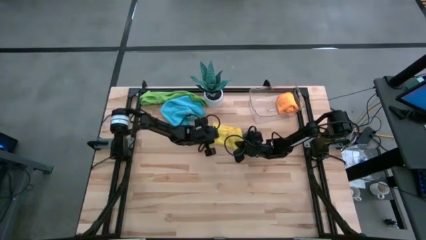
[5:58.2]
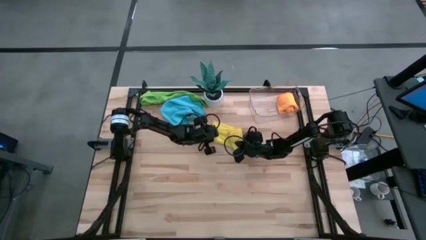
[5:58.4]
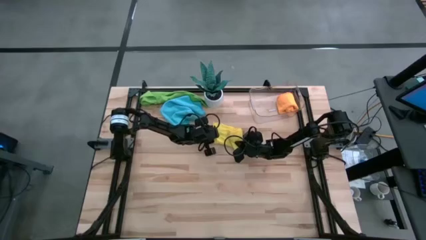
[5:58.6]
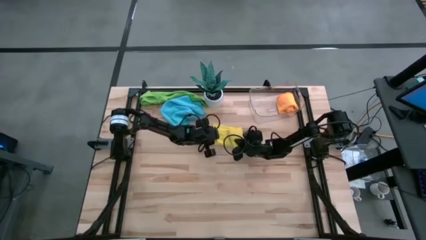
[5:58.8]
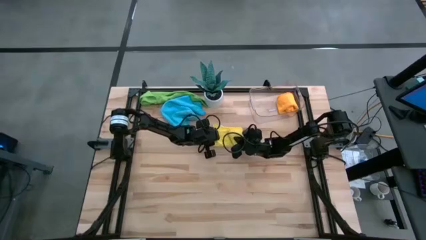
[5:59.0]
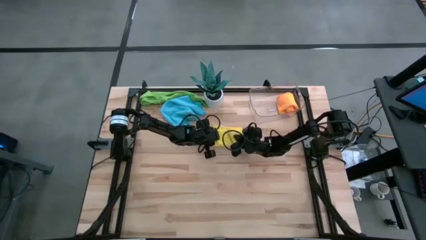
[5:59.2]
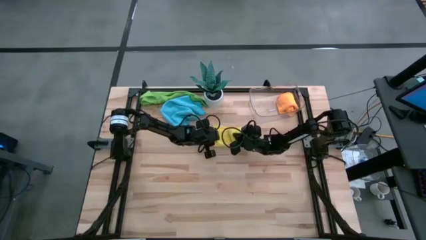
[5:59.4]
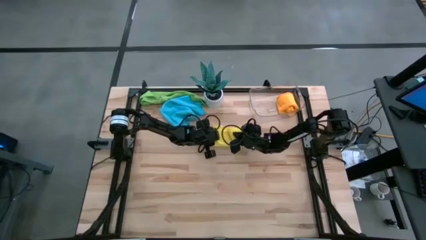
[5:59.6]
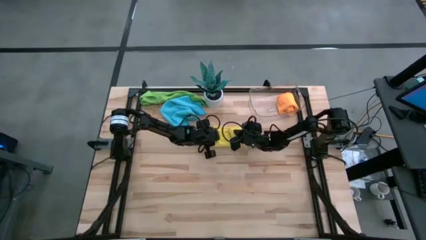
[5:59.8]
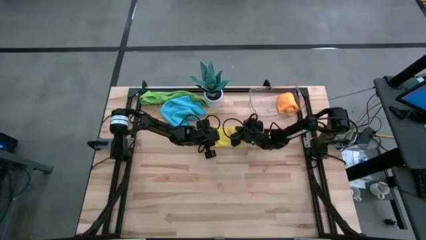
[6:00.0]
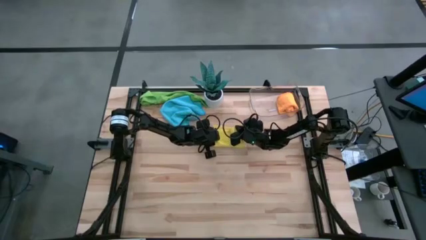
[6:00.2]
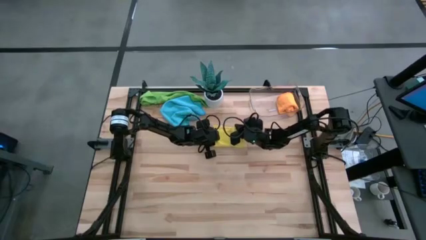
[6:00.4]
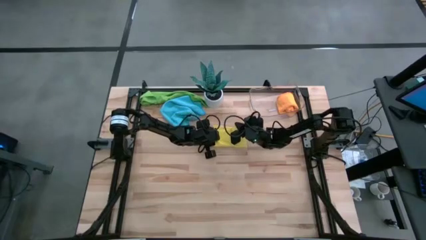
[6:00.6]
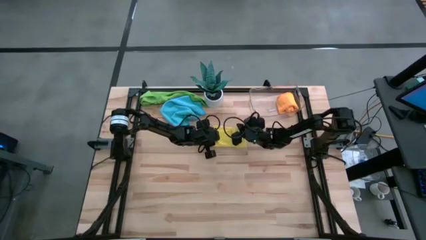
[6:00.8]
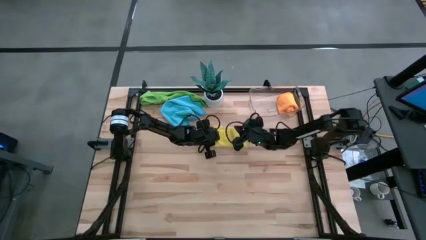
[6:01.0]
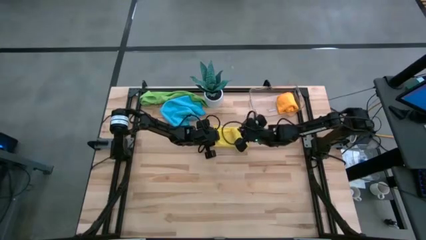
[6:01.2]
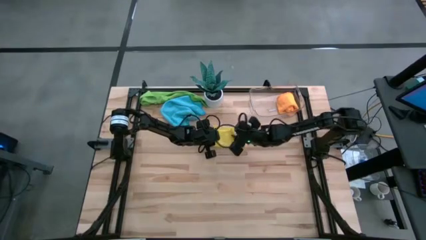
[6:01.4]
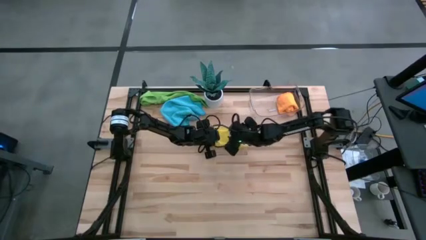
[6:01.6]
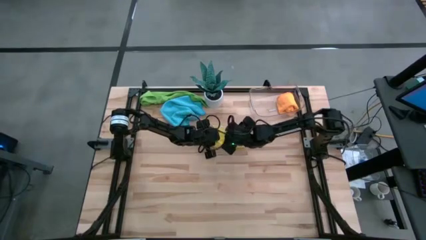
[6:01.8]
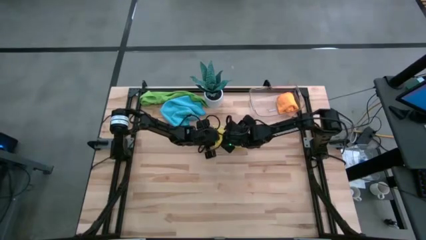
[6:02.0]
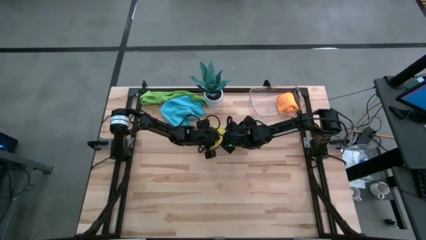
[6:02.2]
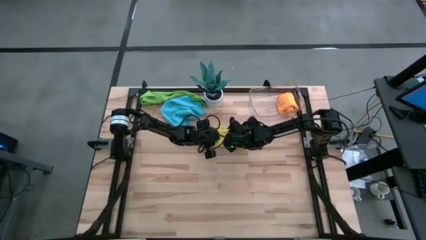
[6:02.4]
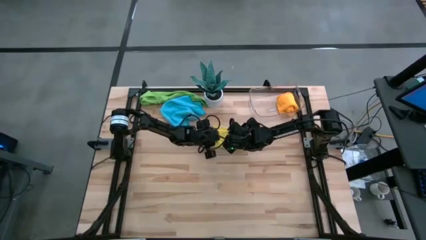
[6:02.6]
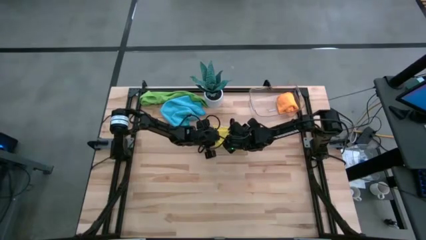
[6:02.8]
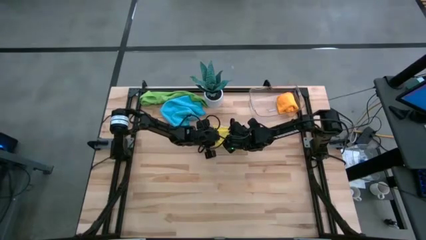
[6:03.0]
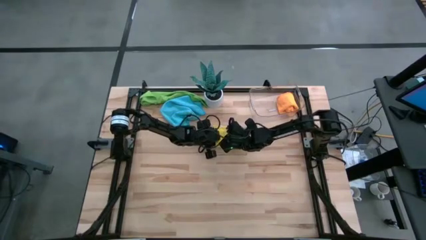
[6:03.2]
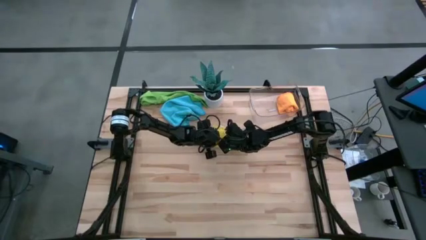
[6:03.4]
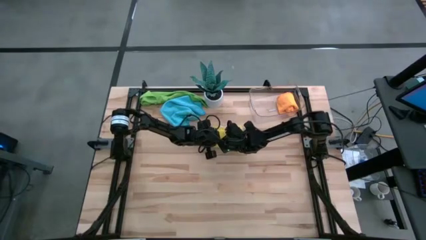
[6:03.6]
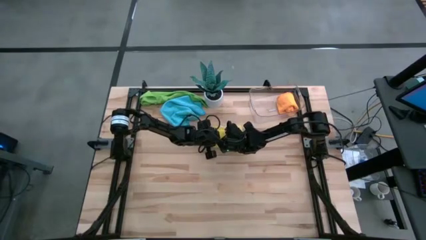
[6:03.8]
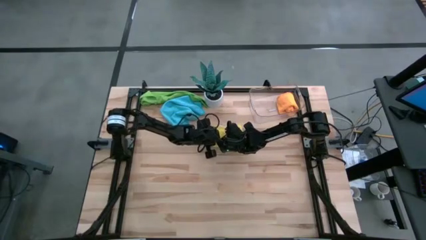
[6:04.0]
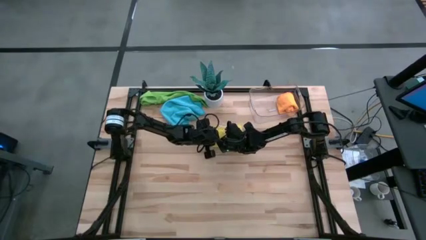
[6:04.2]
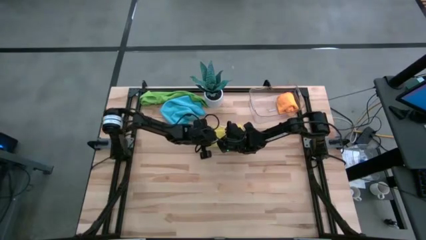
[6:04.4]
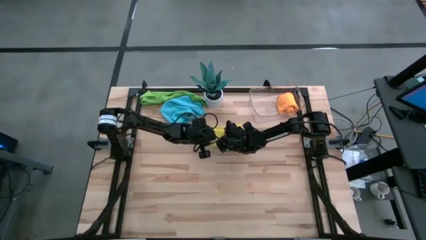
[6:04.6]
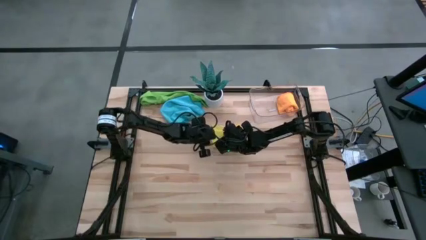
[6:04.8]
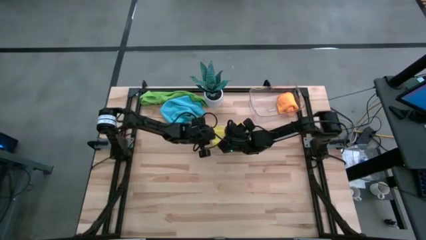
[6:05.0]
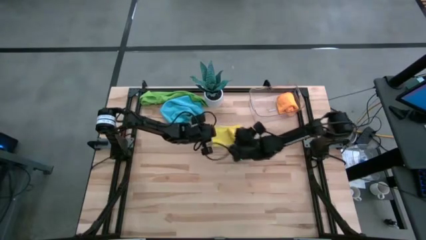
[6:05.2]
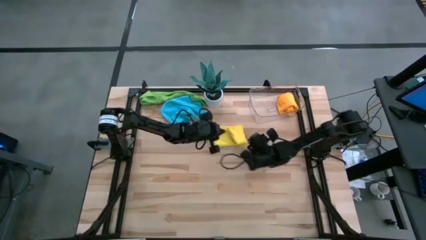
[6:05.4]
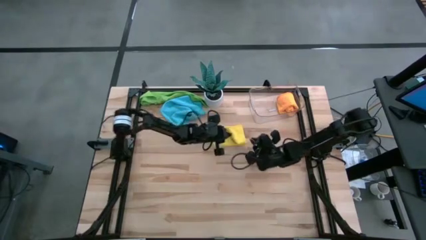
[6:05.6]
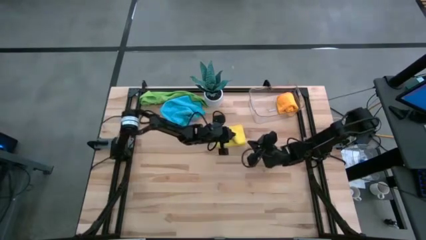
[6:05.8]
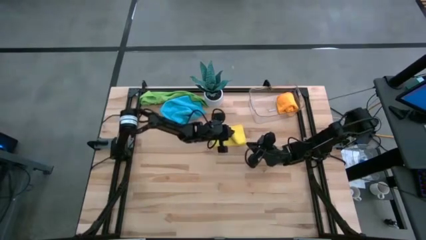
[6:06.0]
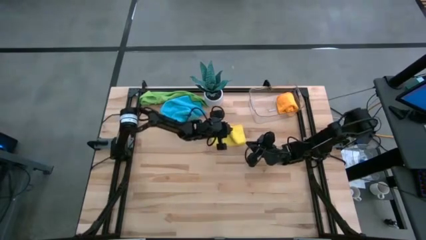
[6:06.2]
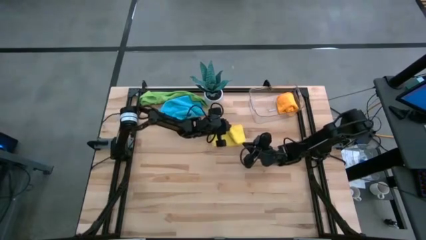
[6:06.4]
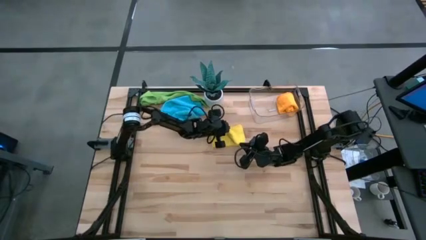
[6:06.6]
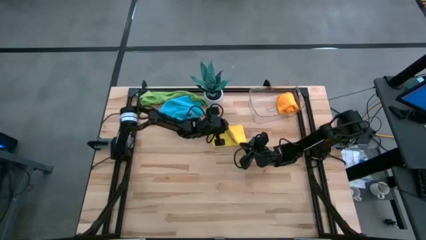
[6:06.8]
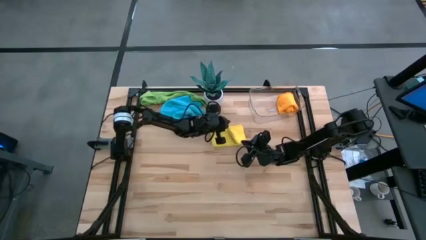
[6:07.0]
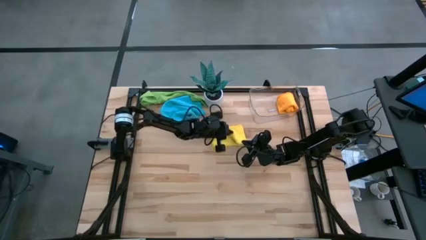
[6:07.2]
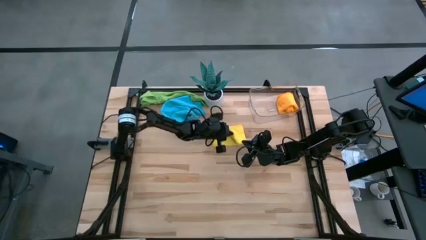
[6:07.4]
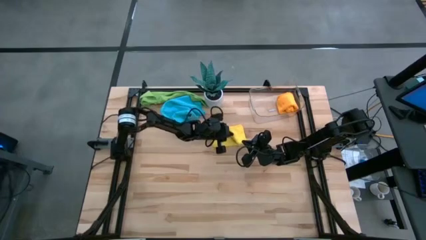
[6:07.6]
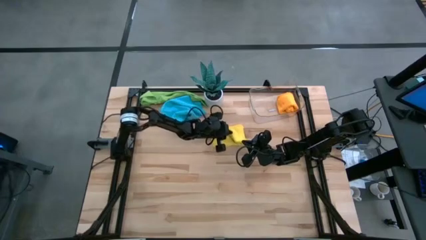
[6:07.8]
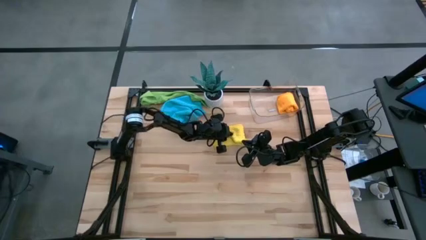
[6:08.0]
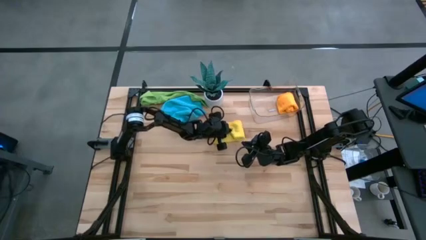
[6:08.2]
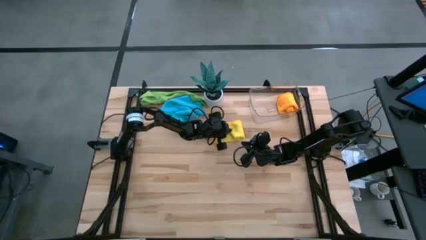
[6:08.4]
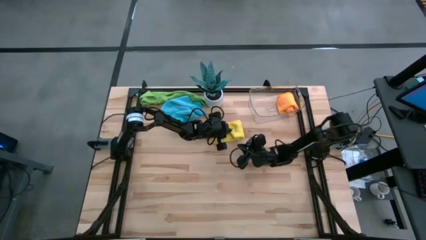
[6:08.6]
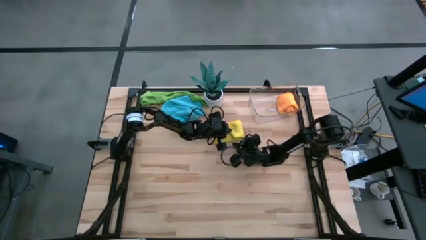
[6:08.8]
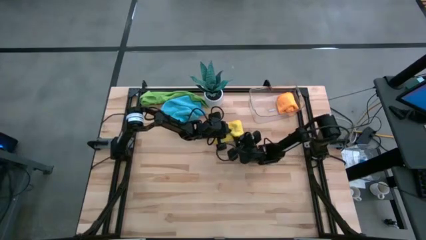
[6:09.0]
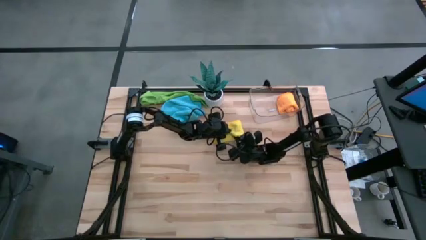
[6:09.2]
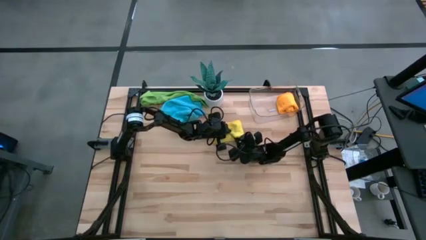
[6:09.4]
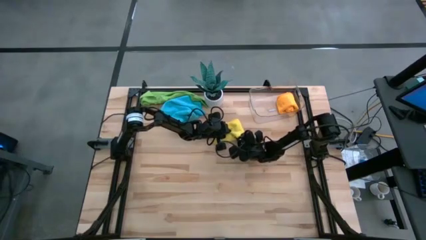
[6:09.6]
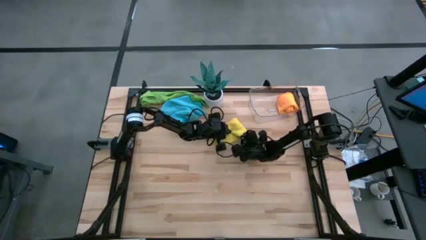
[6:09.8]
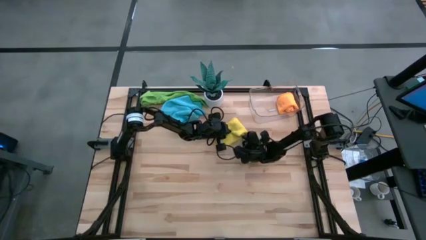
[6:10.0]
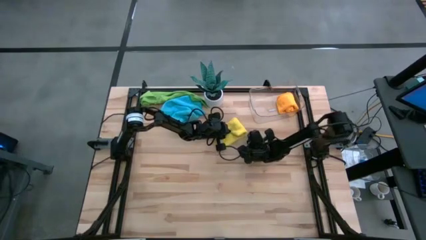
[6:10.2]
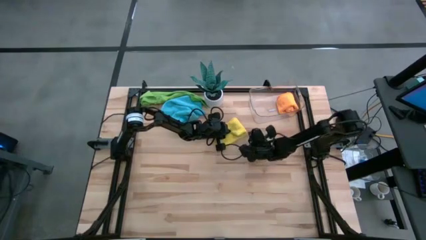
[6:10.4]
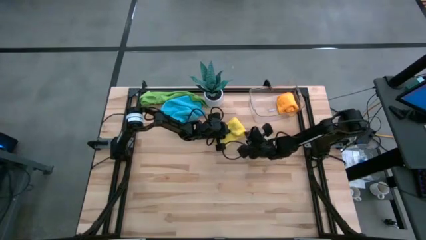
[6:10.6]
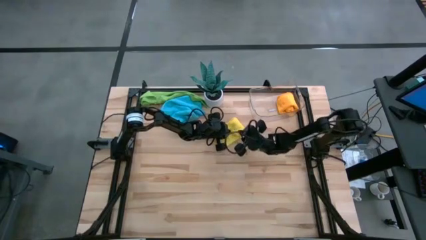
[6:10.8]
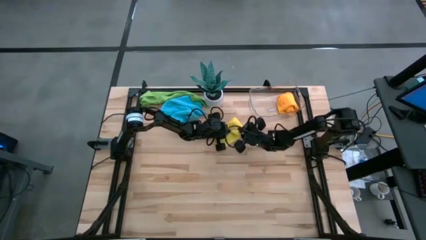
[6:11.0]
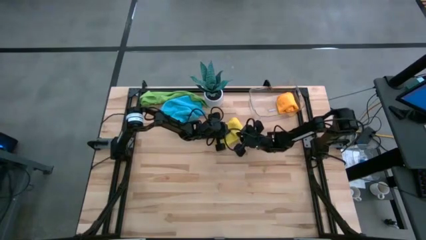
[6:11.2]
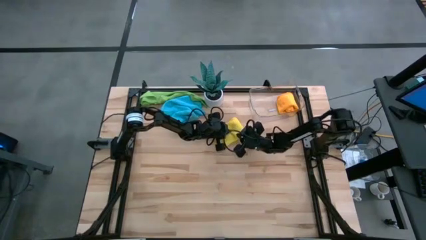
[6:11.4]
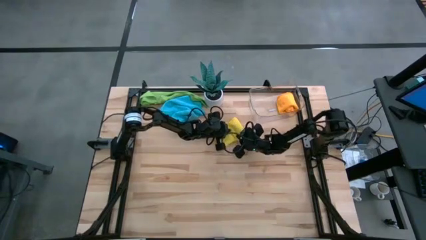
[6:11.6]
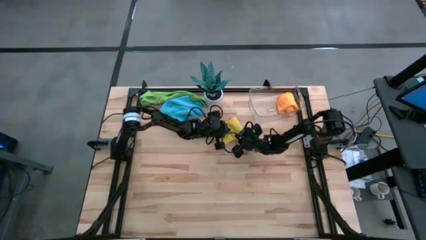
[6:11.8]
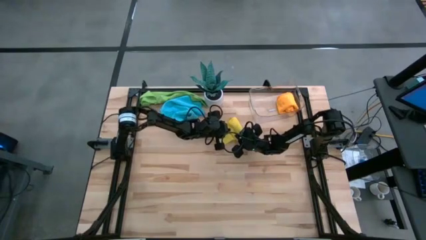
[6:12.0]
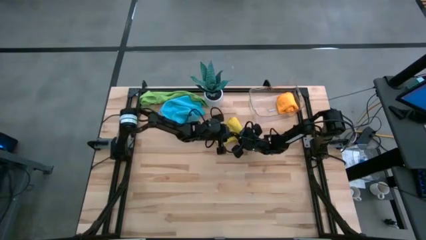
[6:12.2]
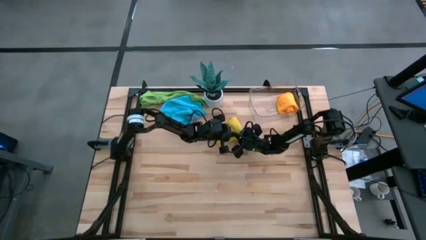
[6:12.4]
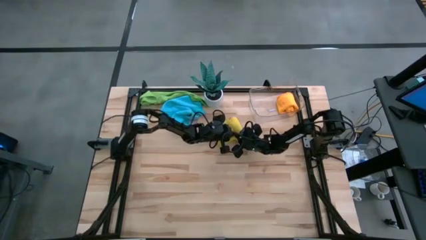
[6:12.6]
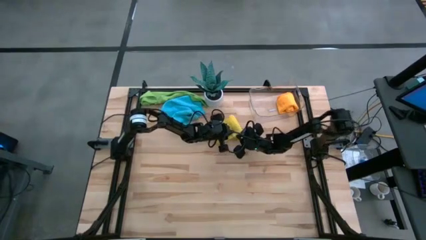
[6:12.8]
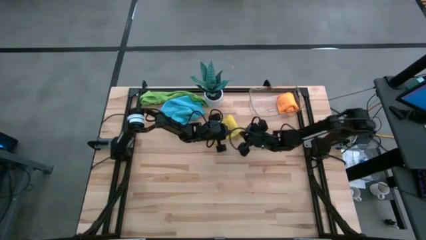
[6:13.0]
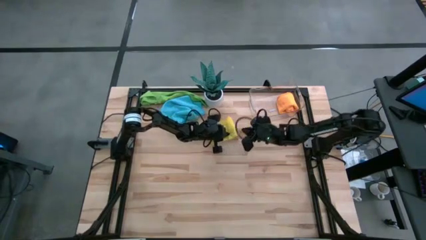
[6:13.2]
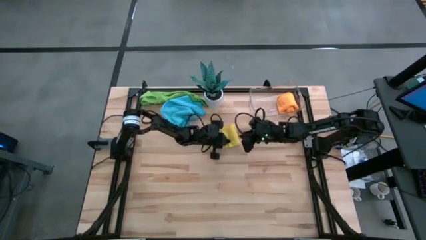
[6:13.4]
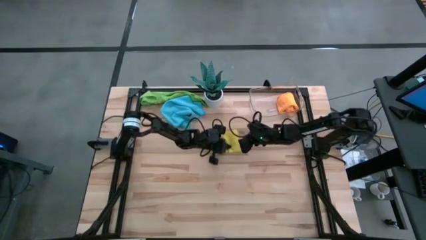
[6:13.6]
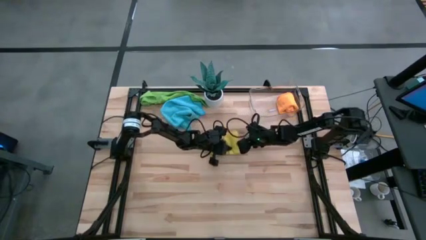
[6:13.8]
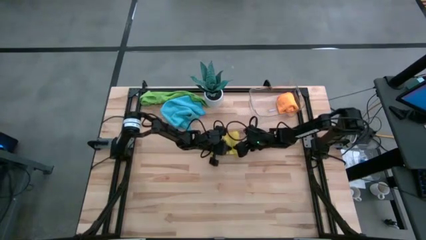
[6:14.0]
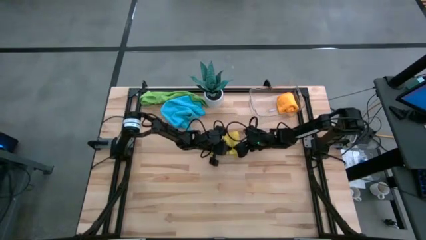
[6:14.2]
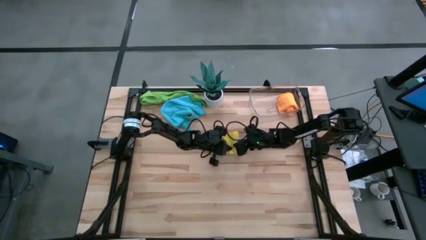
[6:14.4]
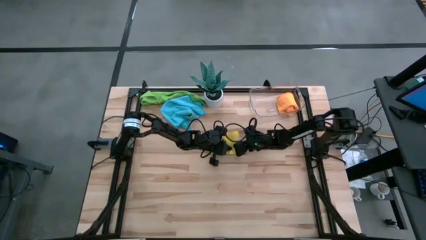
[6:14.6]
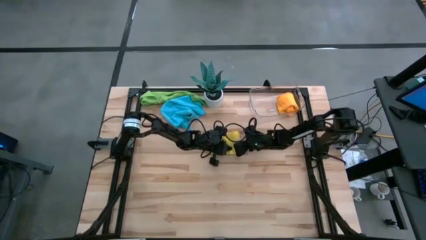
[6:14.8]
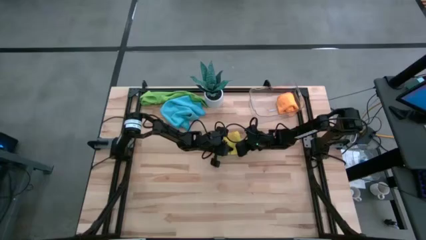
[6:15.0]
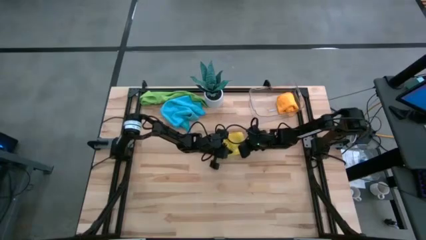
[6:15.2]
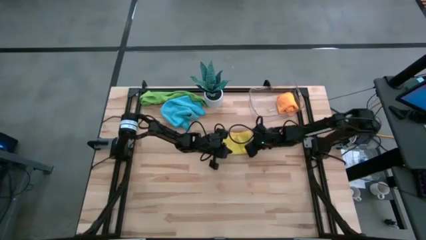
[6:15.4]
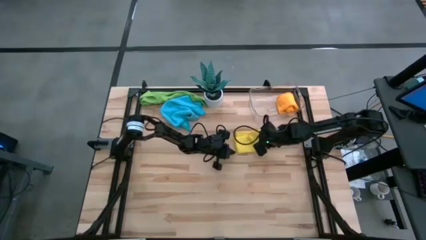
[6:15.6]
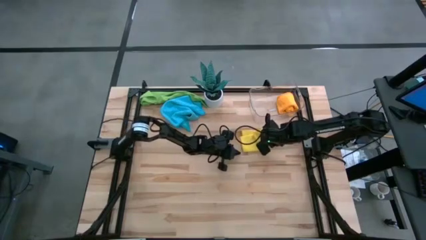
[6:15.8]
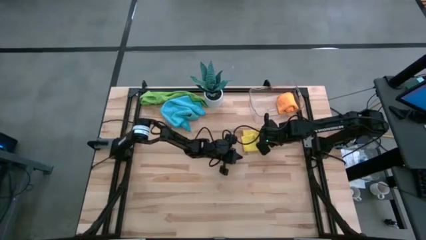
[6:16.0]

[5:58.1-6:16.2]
Task: Roll microfiber towels into tight, uniform cylinder then place into a basket
Roll the yellow microfiber cloth
